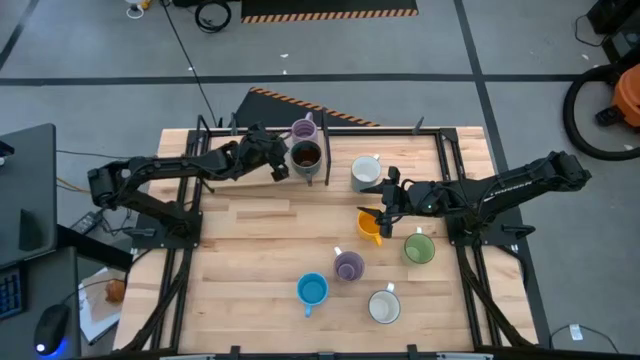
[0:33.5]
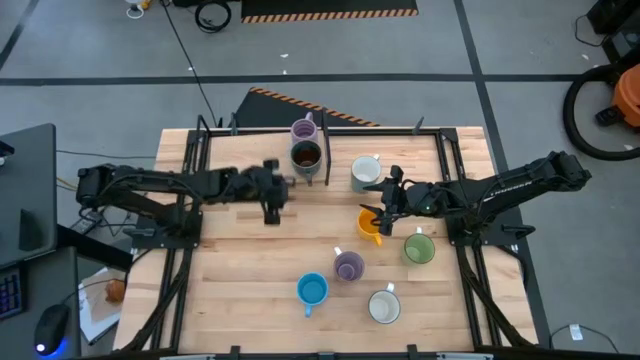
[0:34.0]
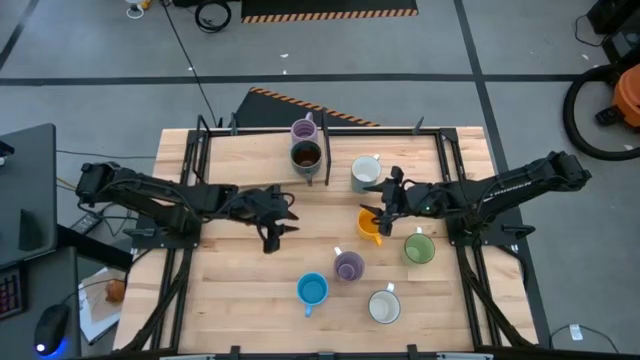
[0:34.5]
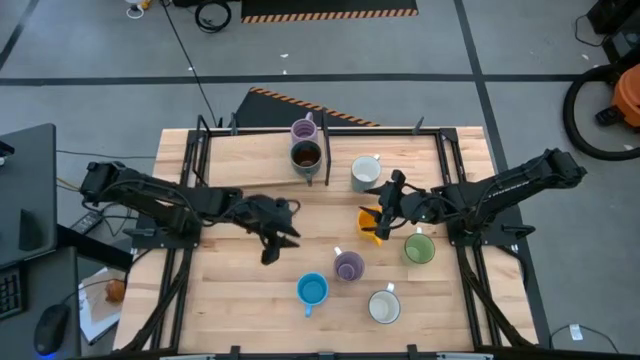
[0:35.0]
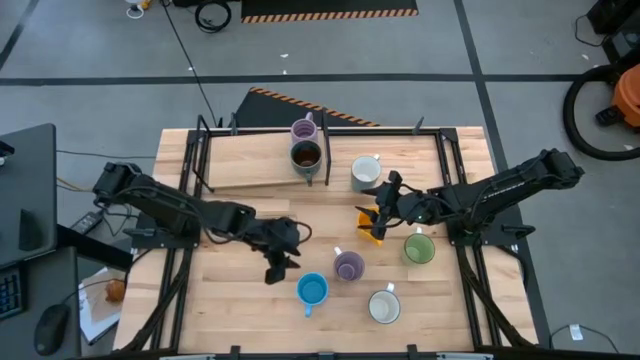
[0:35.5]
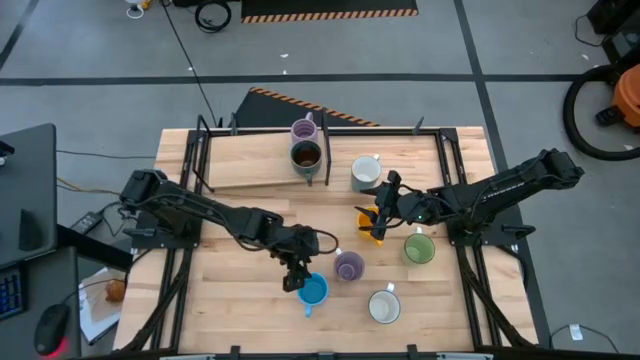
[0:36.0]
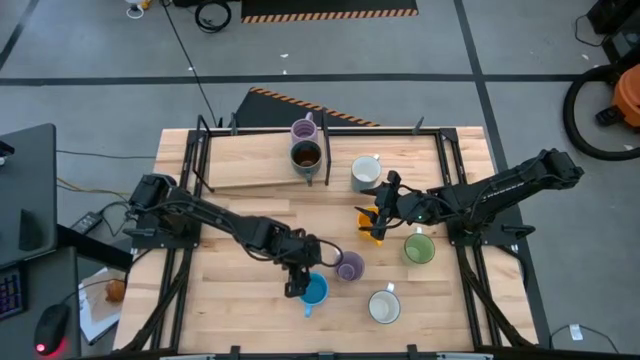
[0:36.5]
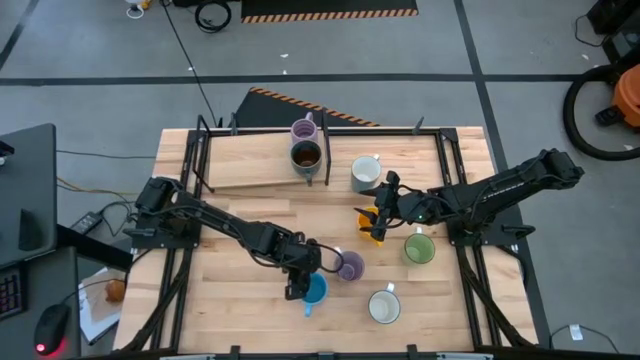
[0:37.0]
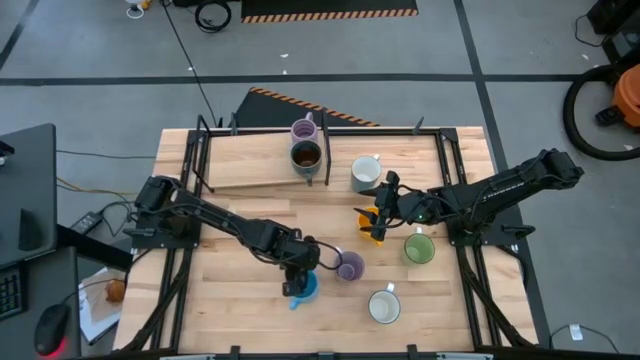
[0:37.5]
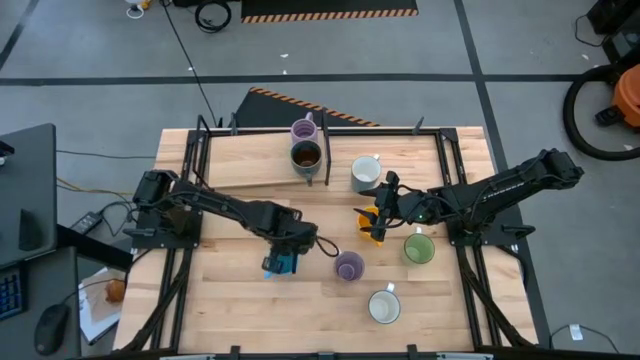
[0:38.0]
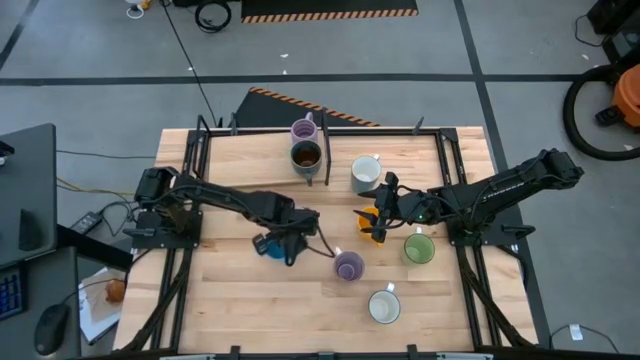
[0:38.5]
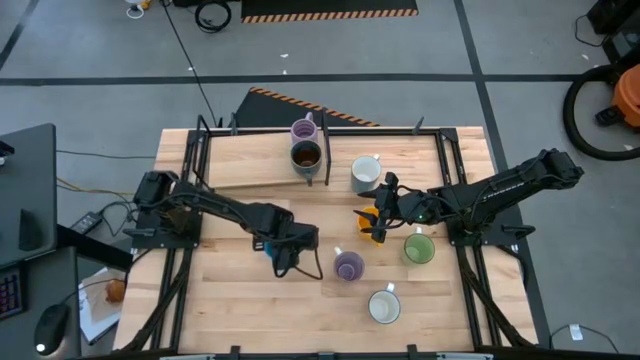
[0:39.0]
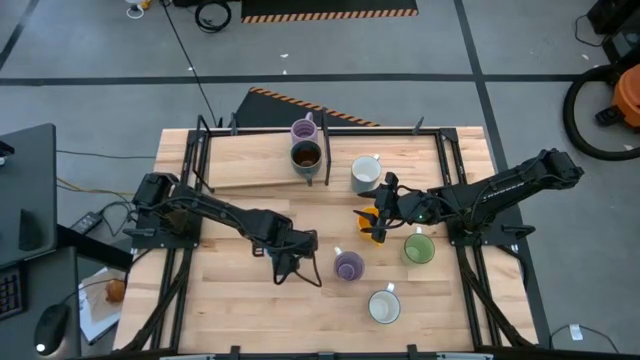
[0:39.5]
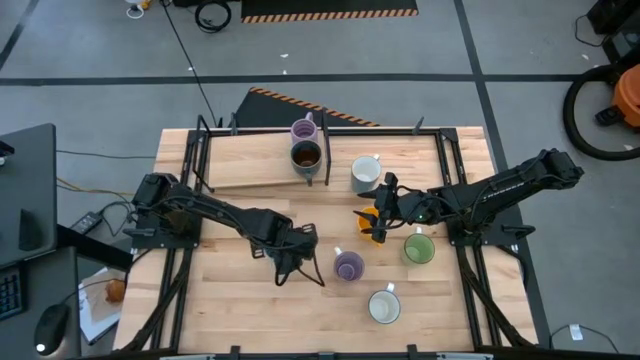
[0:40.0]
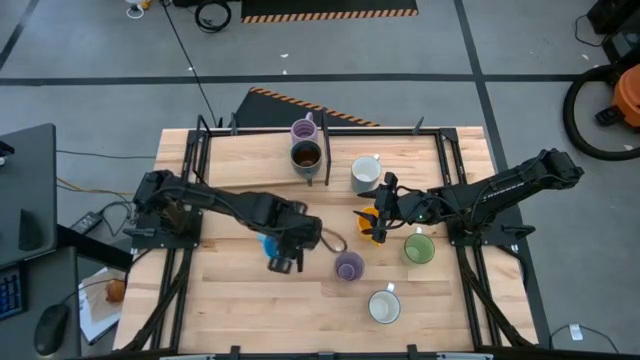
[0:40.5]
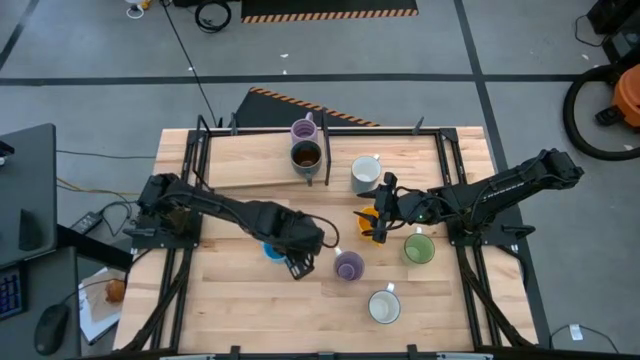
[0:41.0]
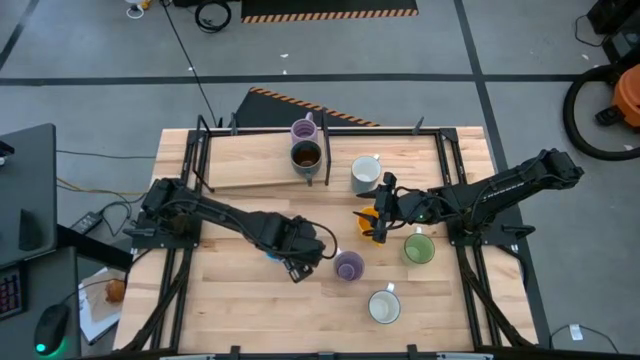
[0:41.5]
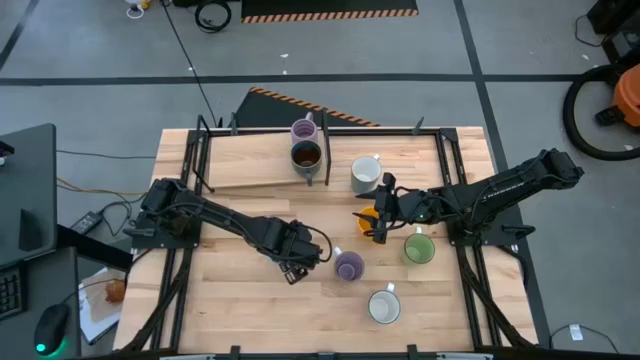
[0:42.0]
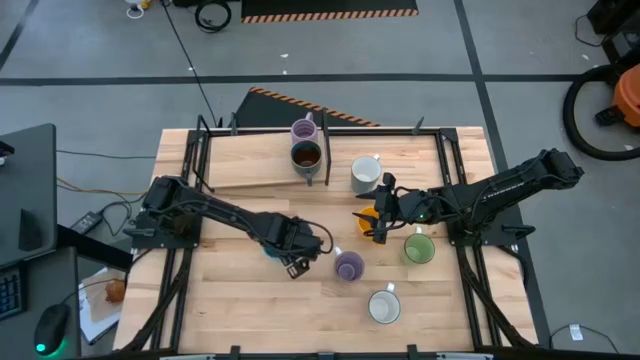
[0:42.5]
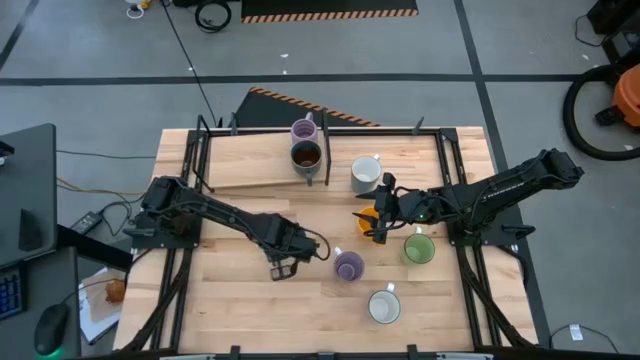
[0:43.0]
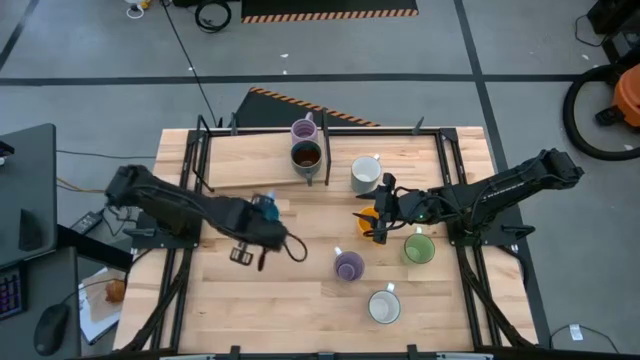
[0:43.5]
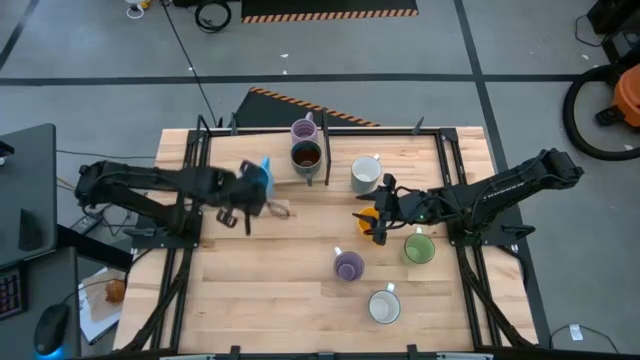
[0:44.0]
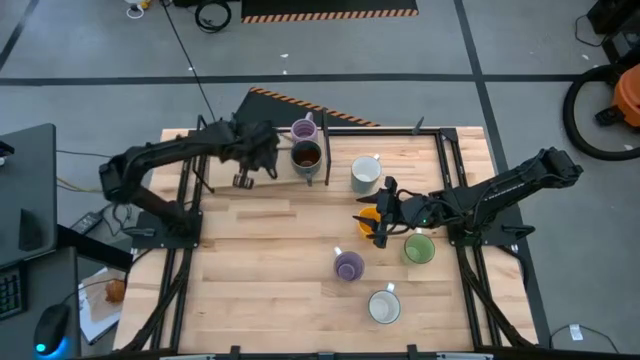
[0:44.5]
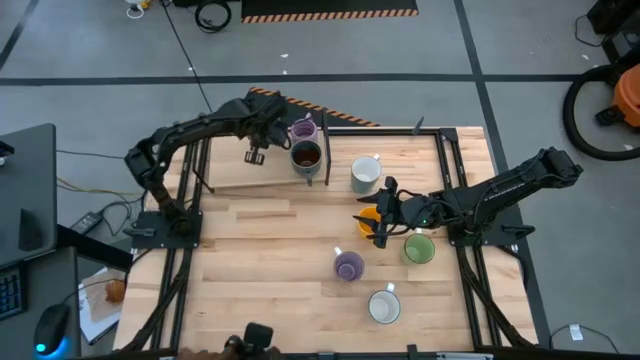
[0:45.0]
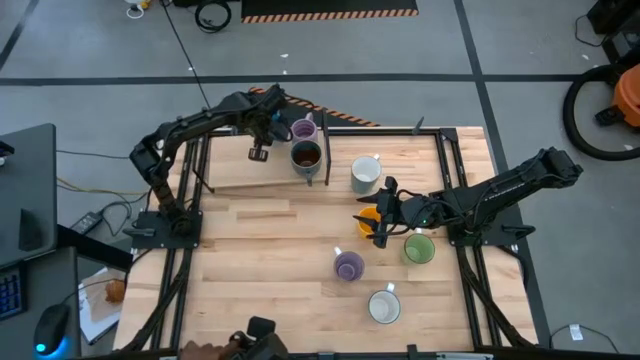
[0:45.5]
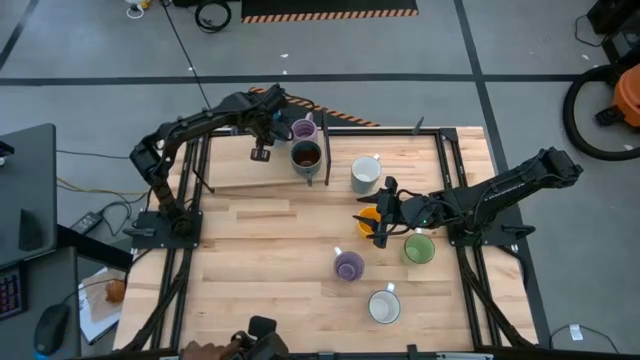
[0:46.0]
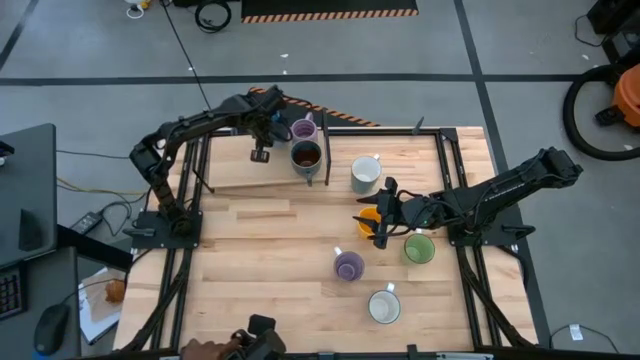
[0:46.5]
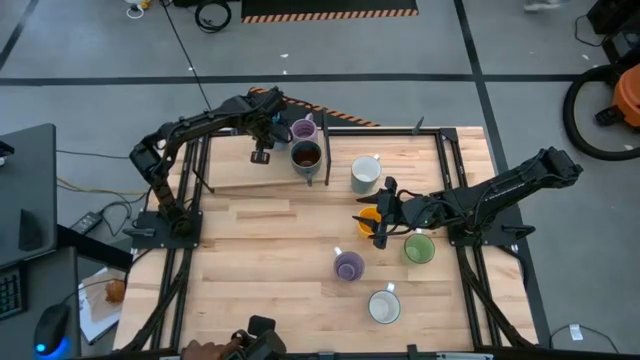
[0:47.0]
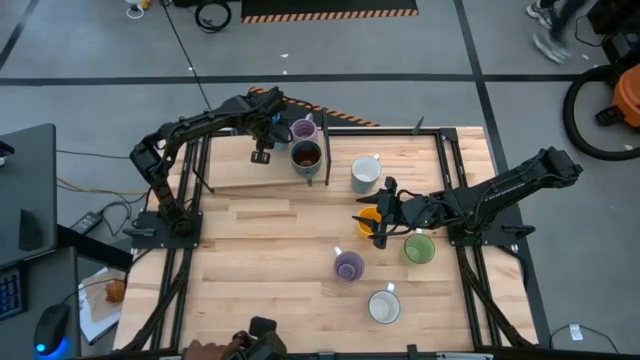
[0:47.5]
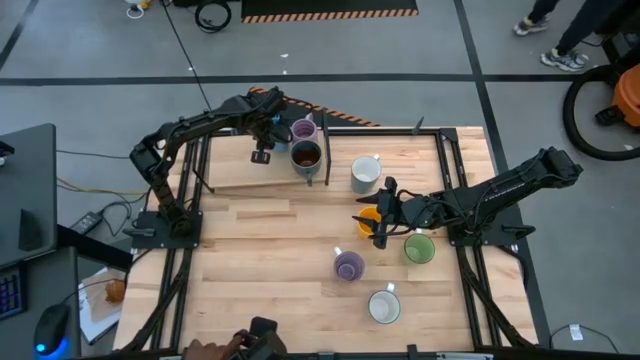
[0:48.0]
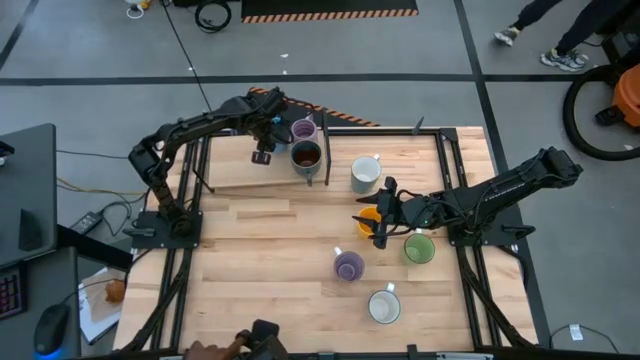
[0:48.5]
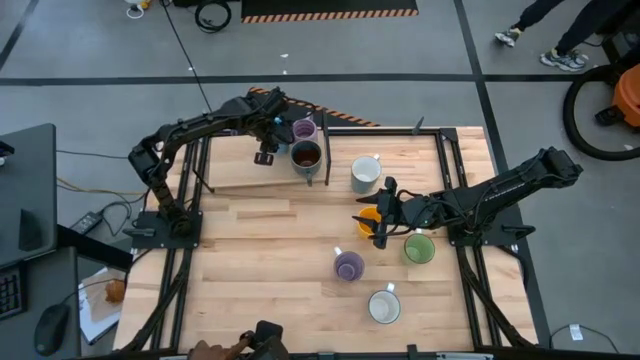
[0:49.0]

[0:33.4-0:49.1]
Task: Place coffee mugs
Put the light blue mug on the shelf
